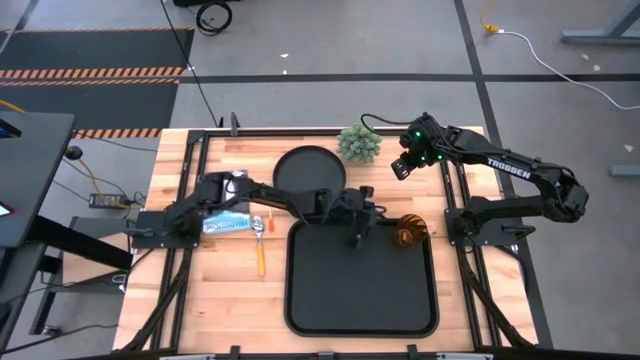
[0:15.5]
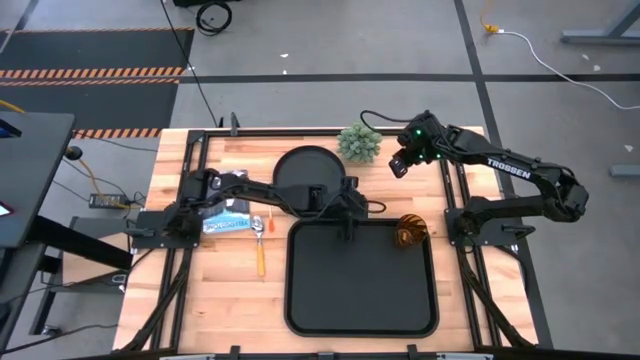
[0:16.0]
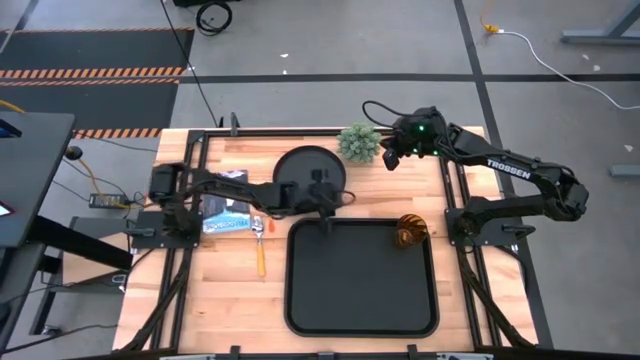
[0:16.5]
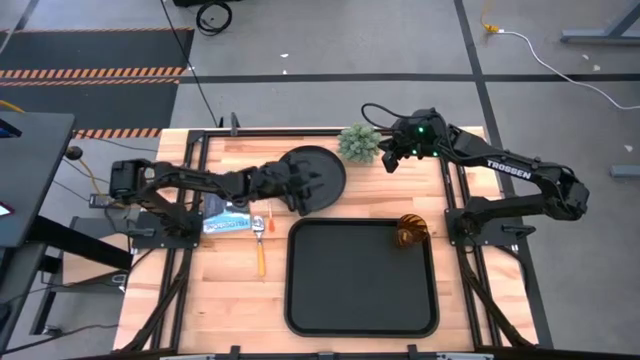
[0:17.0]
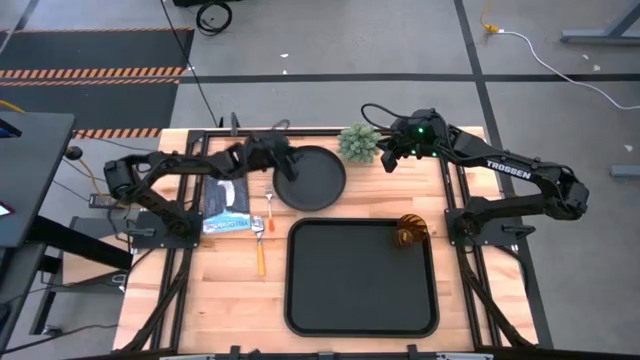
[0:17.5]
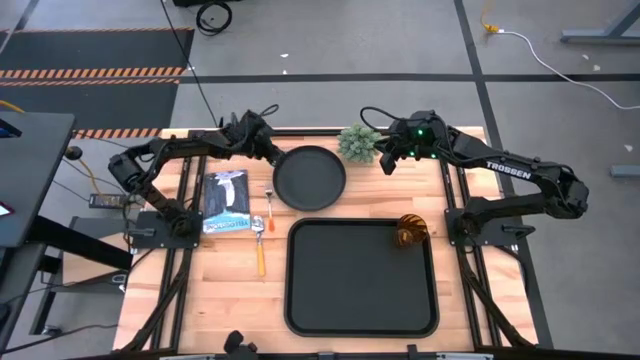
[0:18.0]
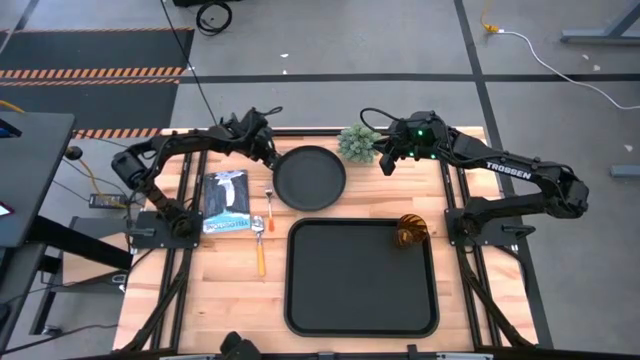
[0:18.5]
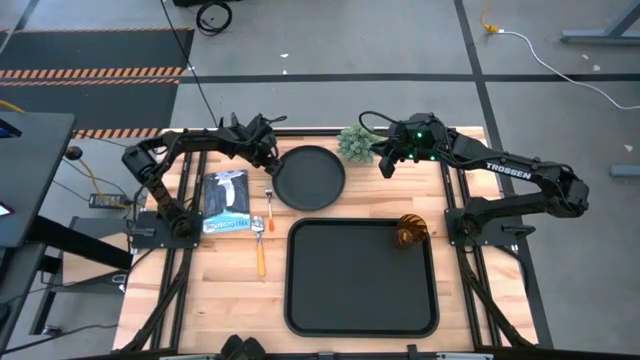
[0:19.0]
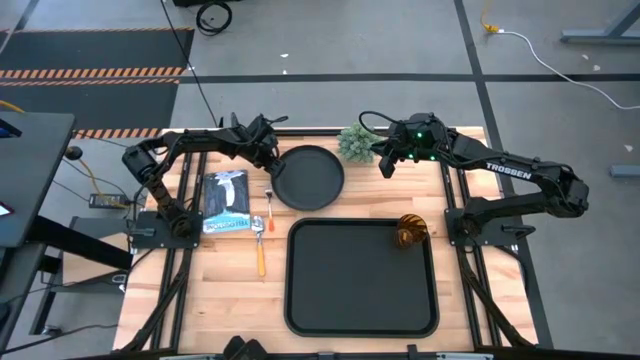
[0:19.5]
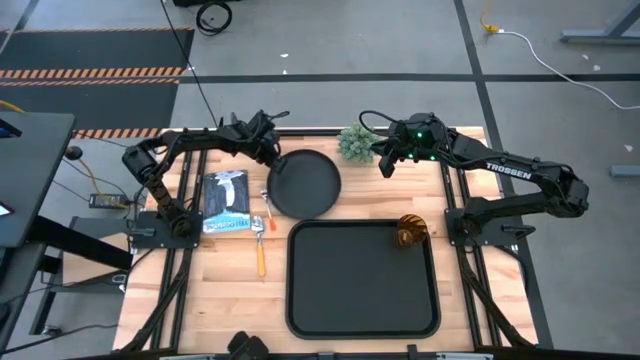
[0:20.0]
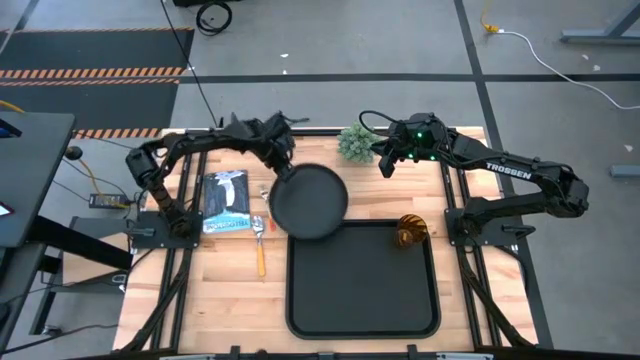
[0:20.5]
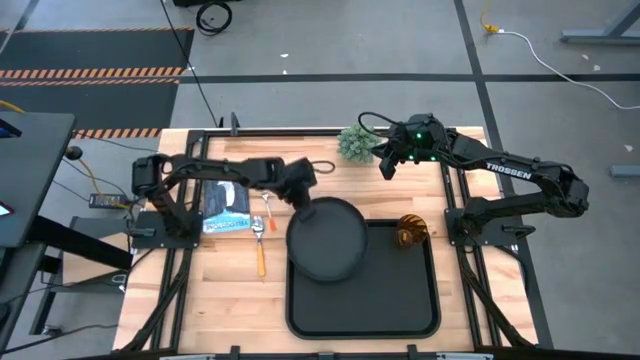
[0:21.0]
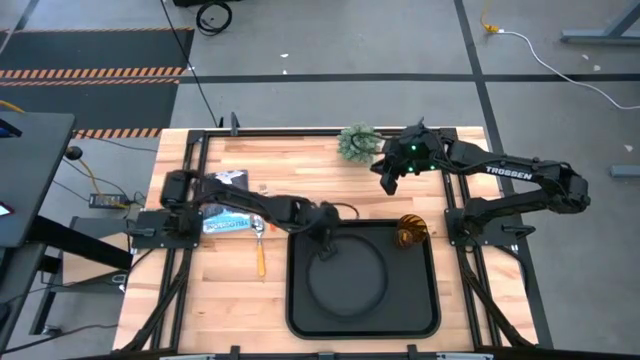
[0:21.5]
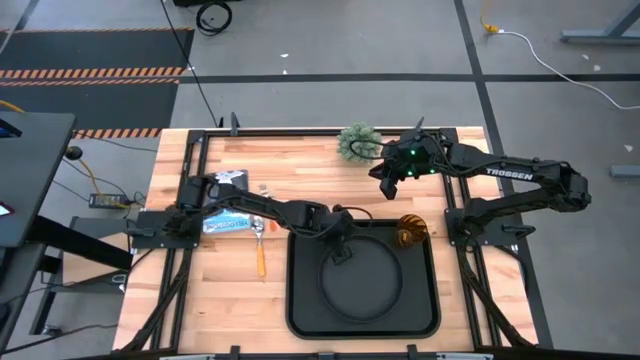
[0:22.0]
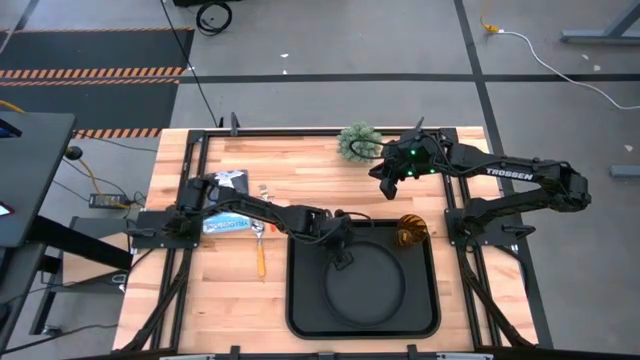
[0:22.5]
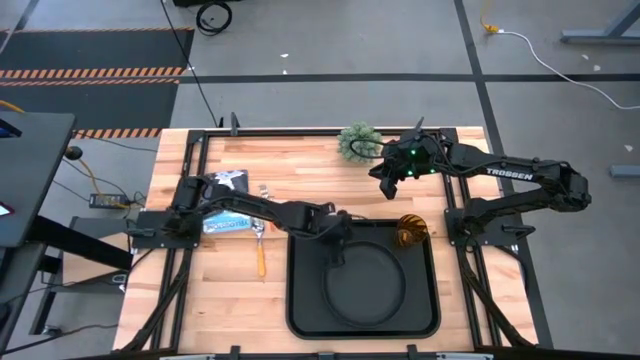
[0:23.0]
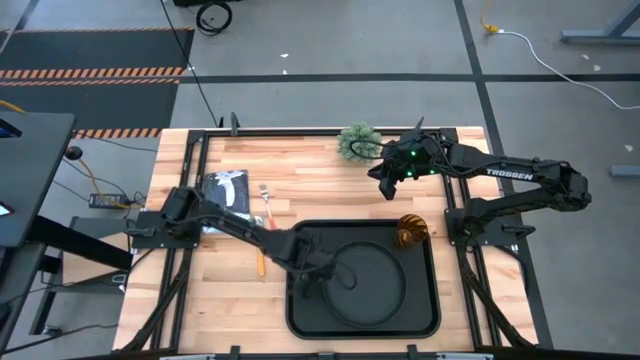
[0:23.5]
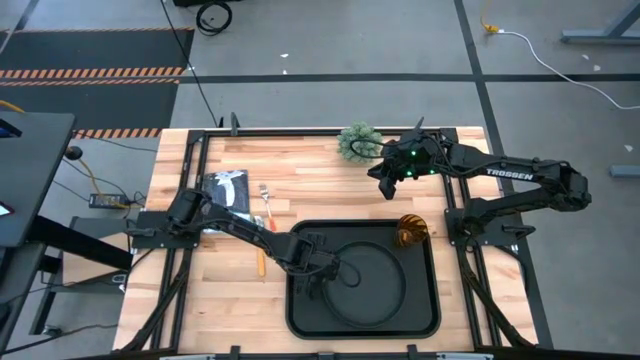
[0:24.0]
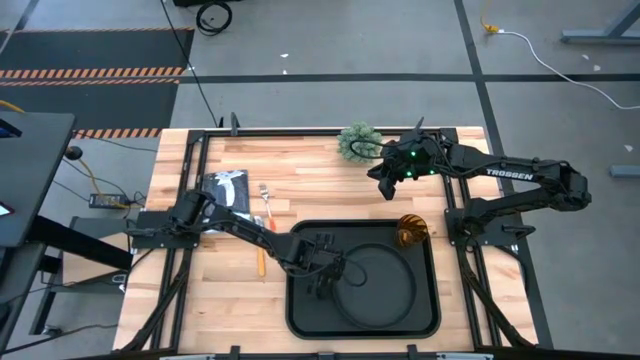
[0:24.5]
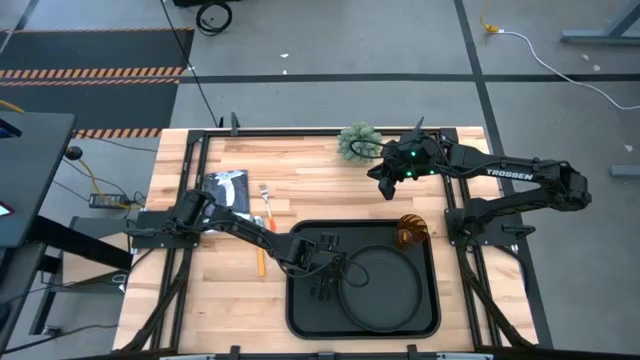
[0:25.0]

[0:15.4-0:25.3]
Task: Pick and place plate/cup/fork/spoon on tray
Put the black plate on the black tray to the bottom left of the brown cup

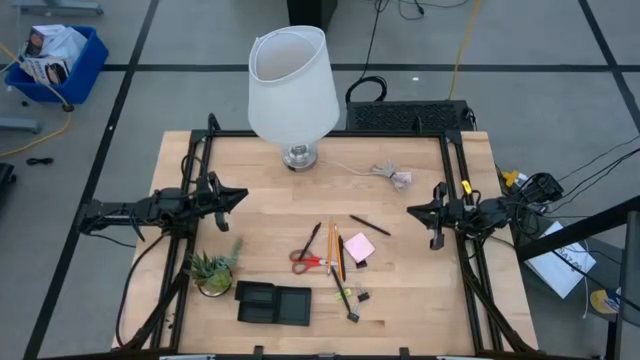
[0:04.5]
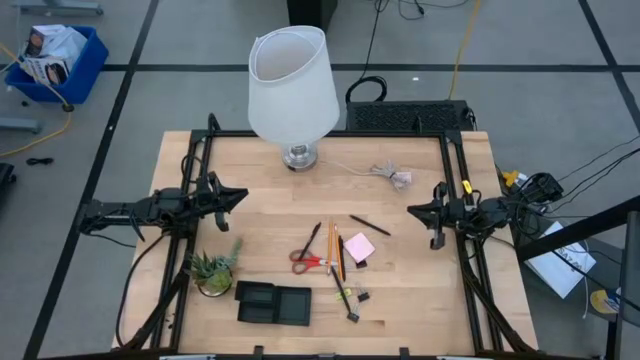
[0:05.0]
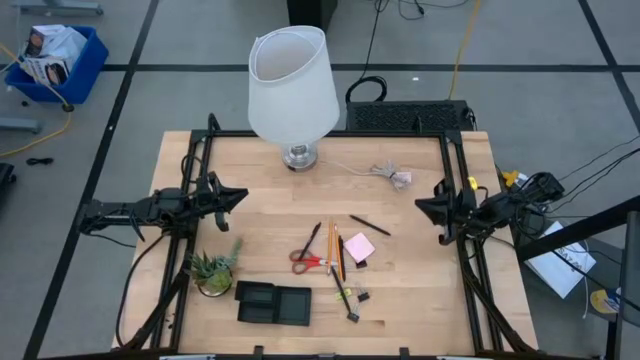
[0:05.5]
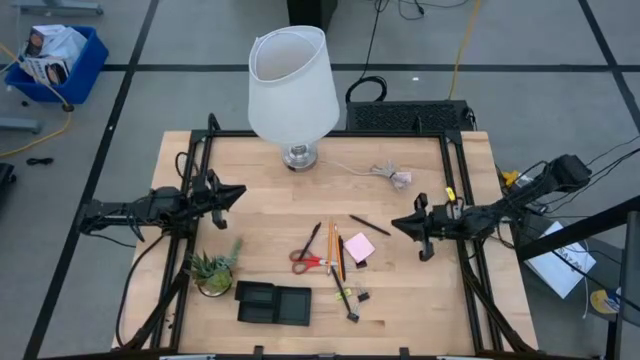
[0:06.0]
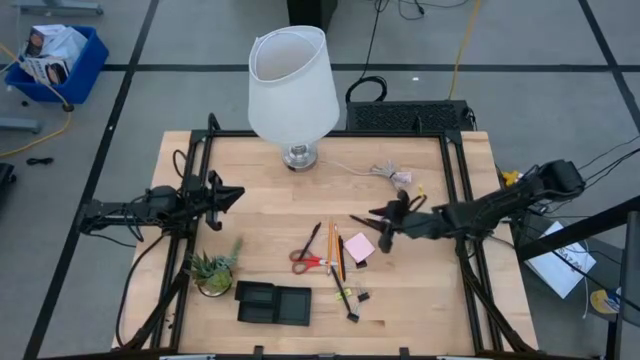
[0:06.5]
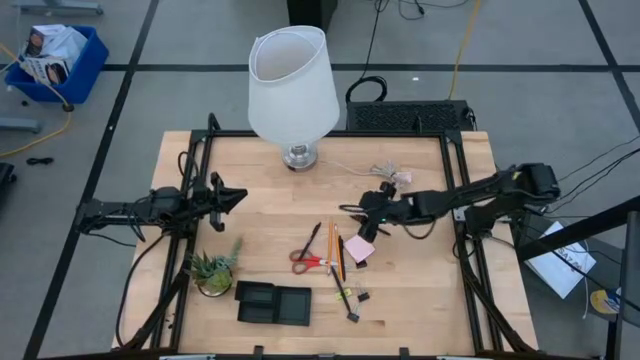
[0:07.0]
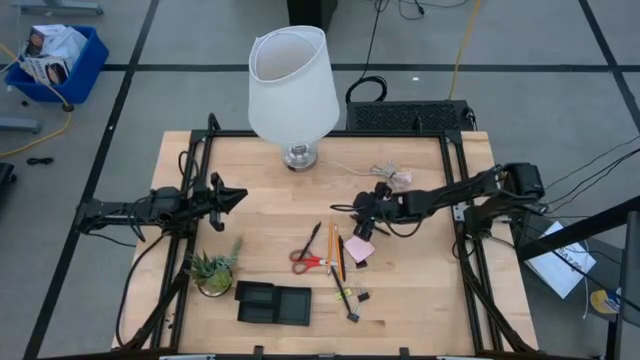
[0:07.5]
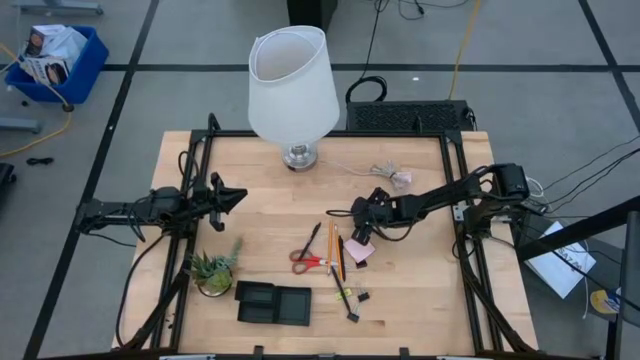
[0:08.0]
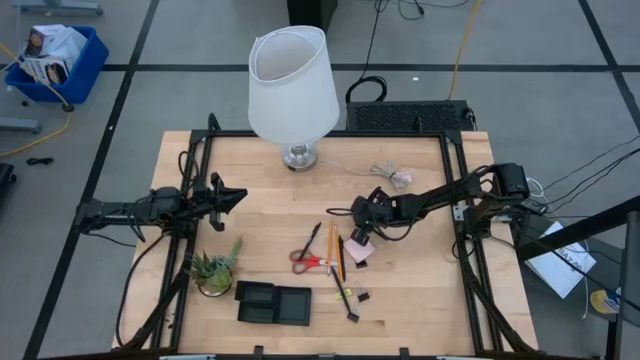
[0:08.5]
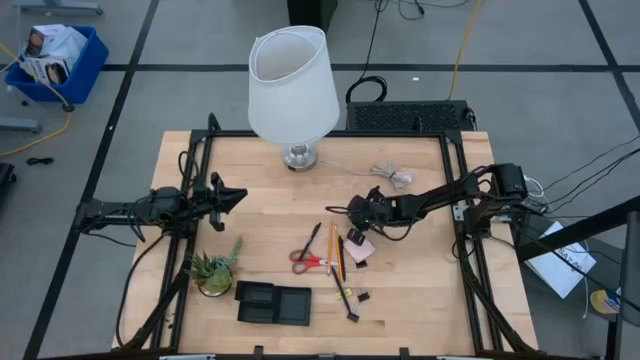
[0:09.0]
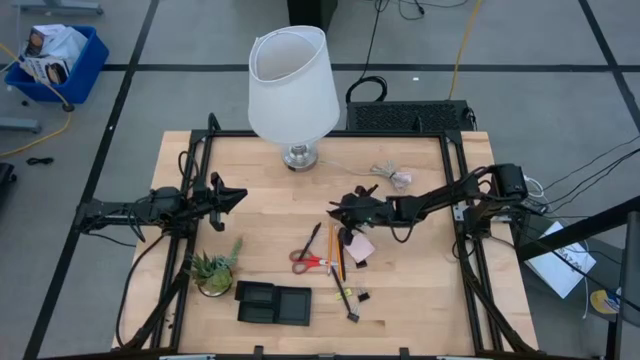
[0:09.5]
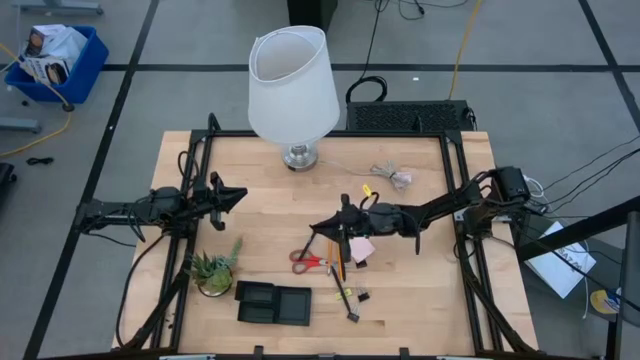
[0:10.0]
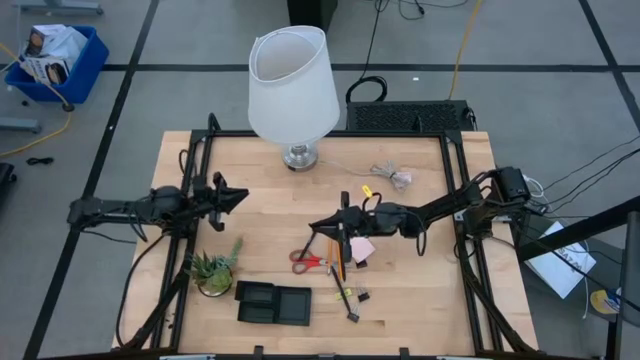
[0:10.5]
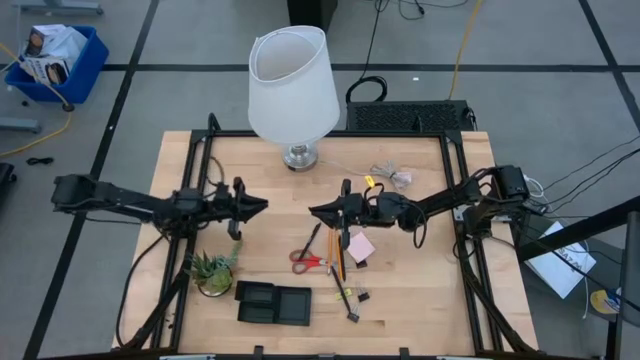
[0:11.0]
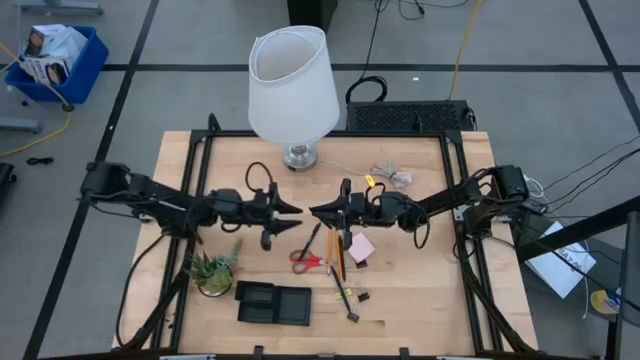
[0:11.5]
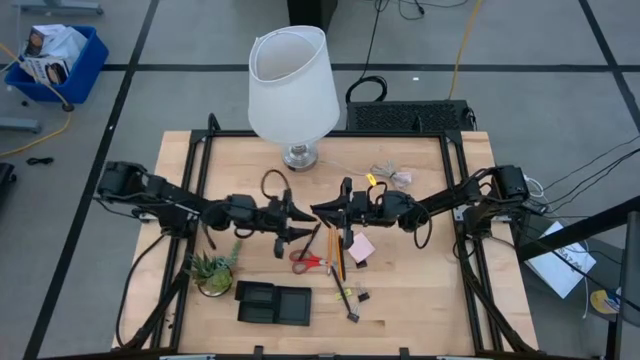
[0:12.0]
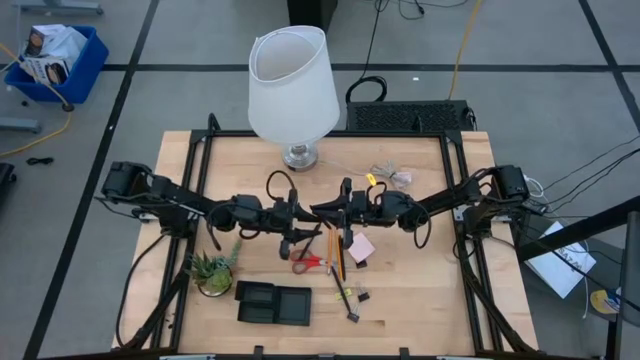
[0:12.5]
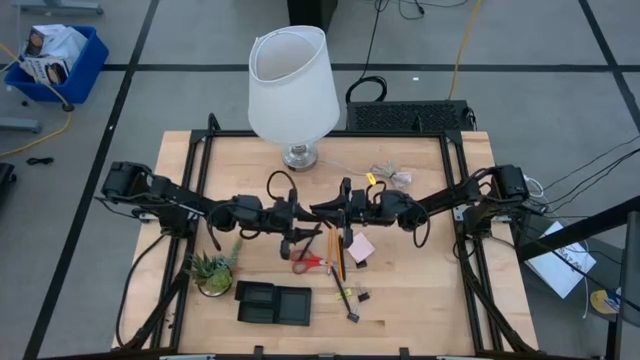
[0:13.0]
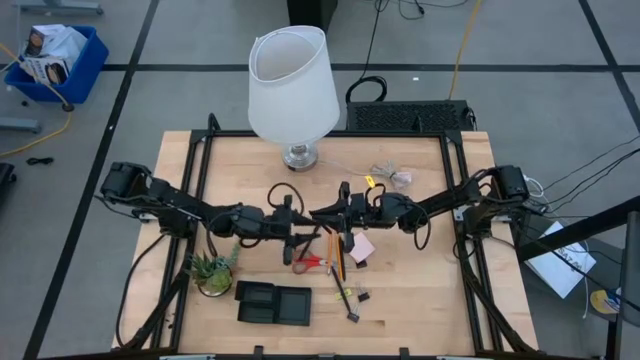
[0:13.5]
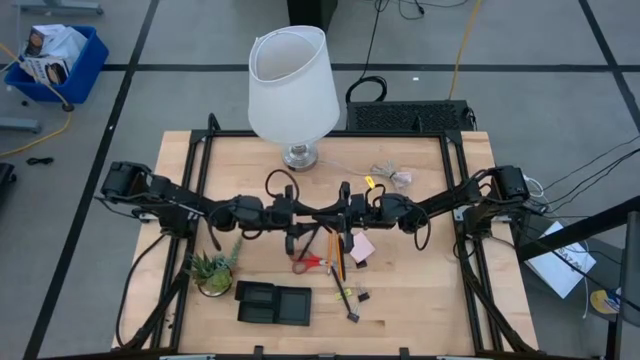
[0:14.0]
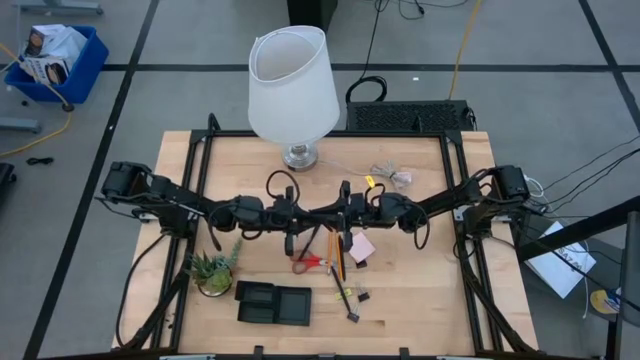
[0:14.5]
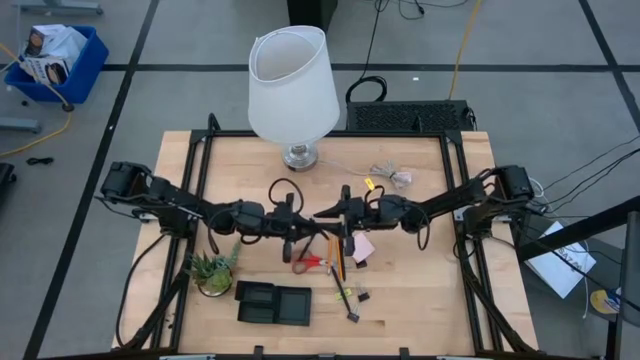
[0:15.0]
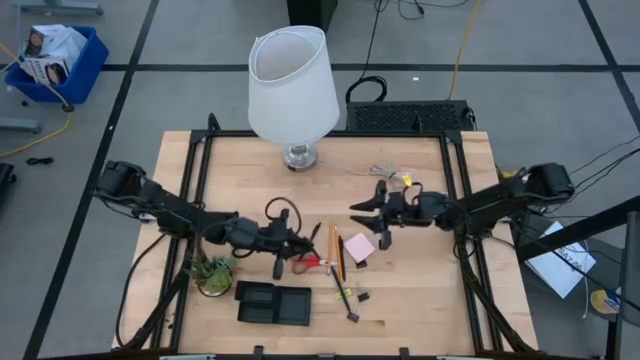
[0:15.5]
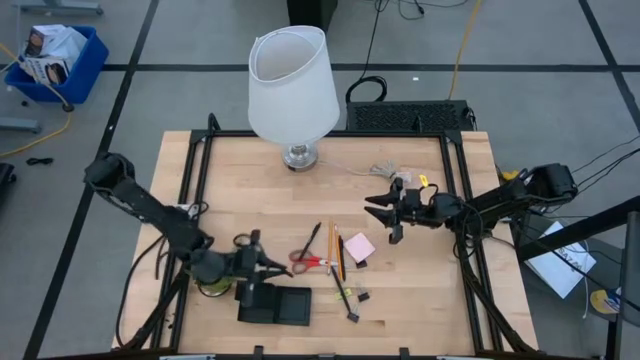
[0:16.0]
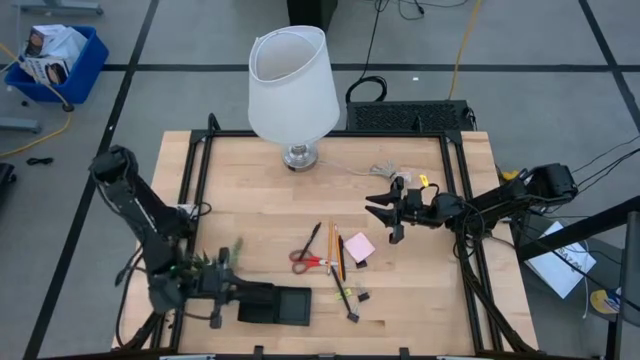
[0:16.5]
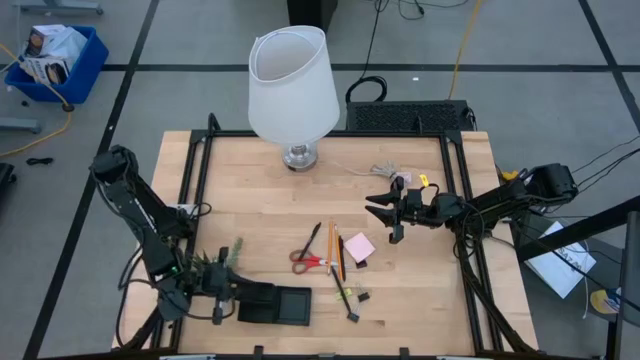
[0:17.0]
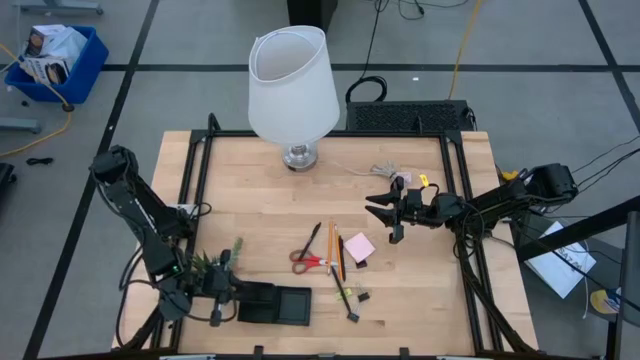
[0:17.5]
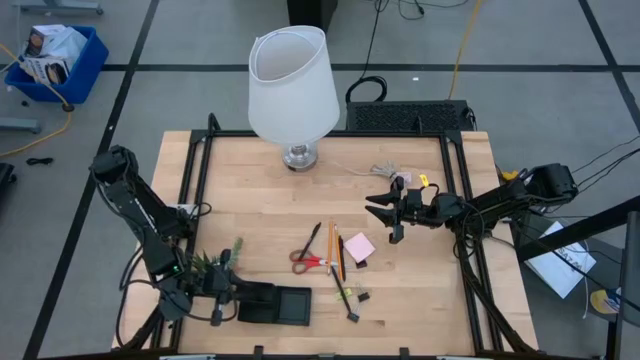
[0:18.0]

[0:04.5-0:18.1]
Task: Pick and place office supplies into organizer
Put the black pen into the black desk organizer
